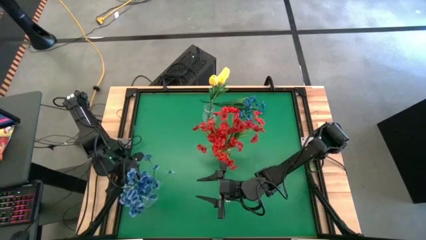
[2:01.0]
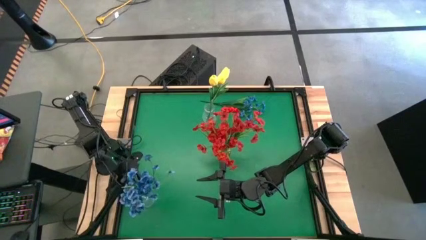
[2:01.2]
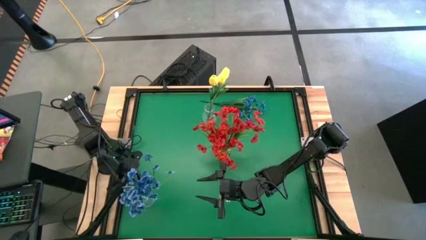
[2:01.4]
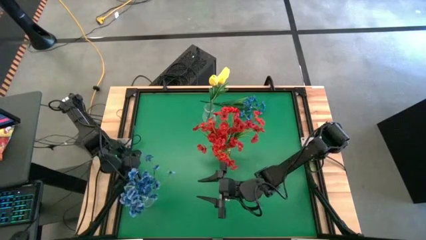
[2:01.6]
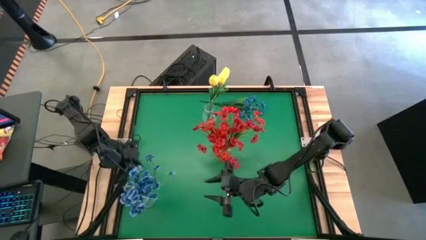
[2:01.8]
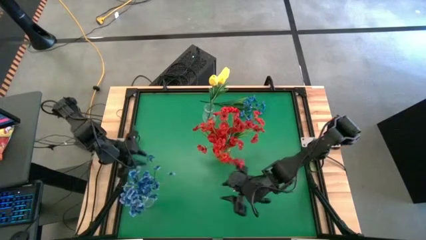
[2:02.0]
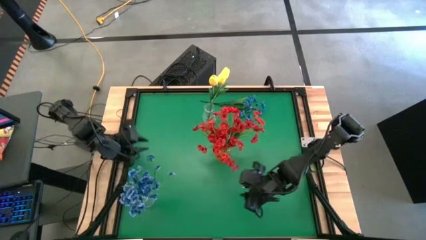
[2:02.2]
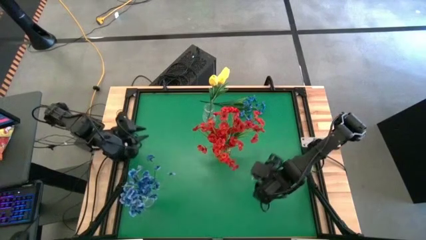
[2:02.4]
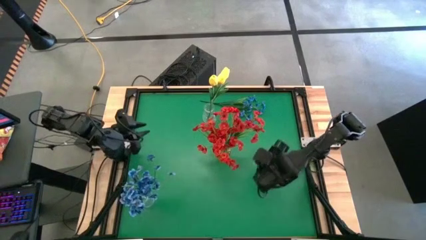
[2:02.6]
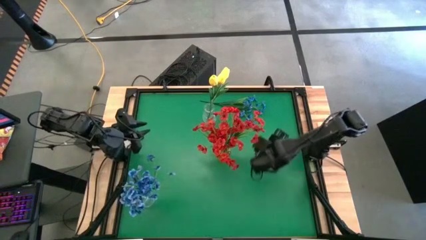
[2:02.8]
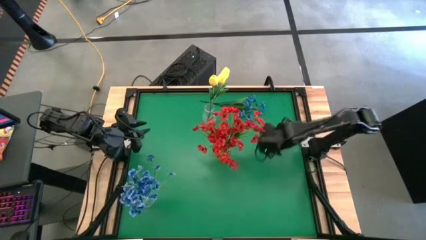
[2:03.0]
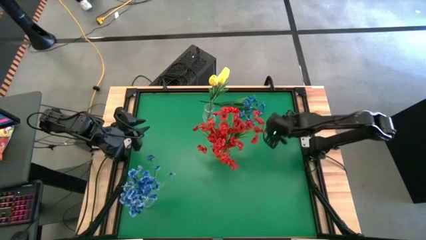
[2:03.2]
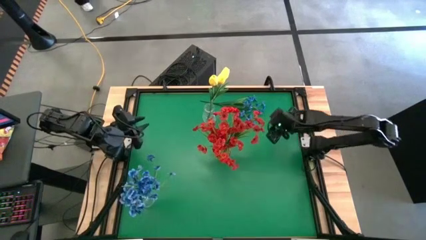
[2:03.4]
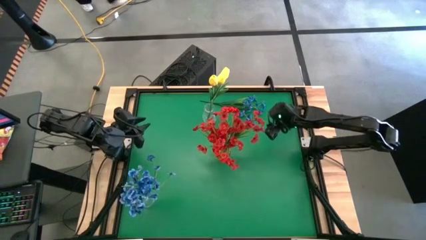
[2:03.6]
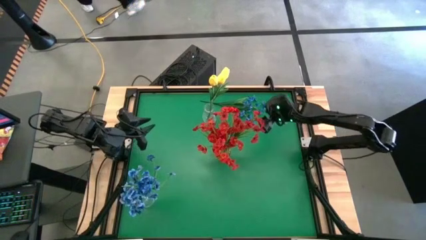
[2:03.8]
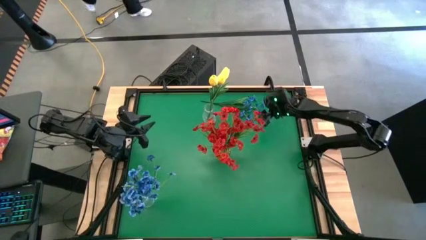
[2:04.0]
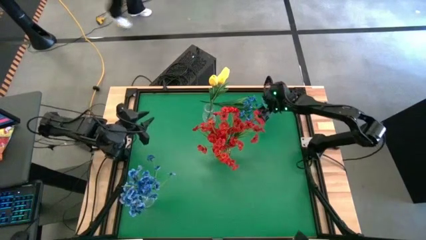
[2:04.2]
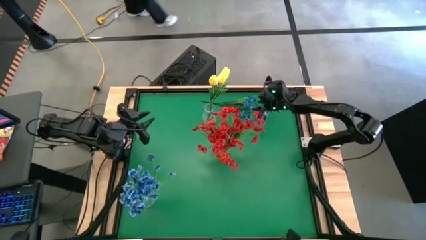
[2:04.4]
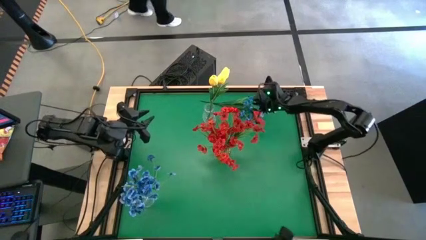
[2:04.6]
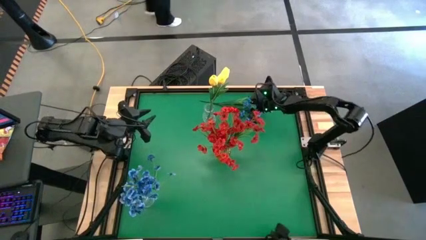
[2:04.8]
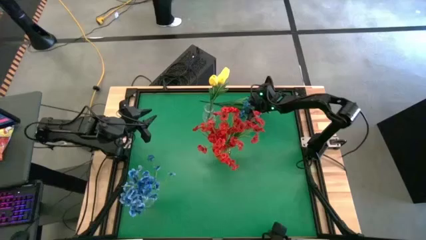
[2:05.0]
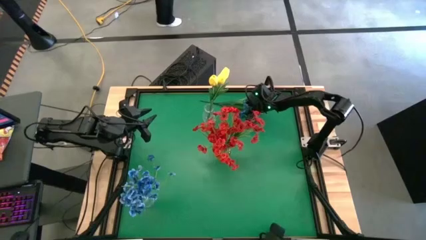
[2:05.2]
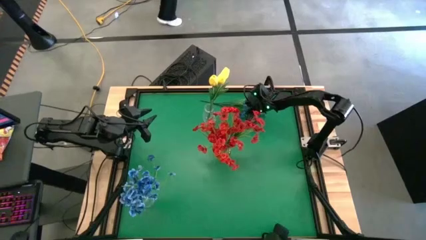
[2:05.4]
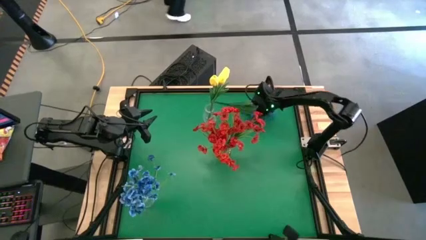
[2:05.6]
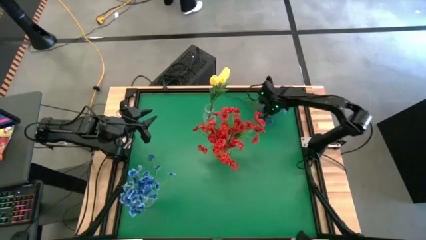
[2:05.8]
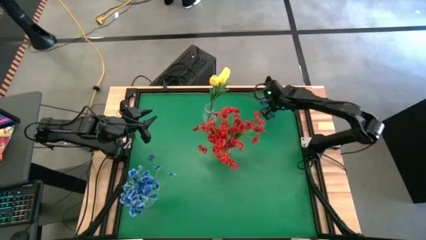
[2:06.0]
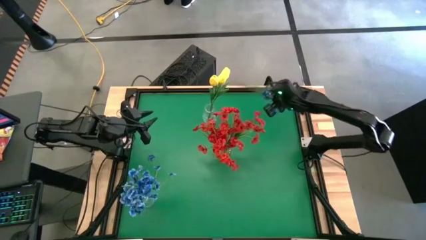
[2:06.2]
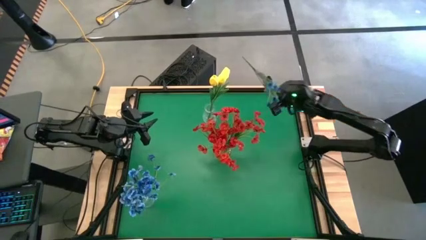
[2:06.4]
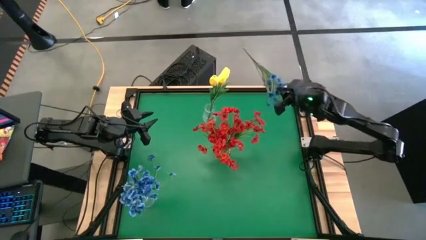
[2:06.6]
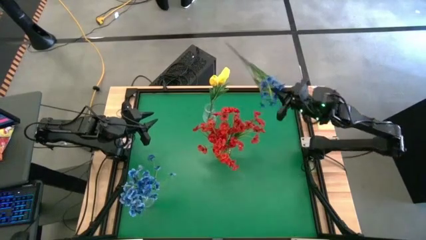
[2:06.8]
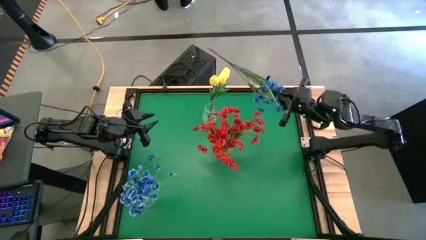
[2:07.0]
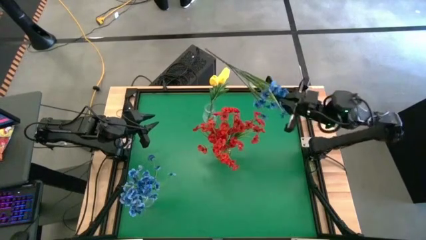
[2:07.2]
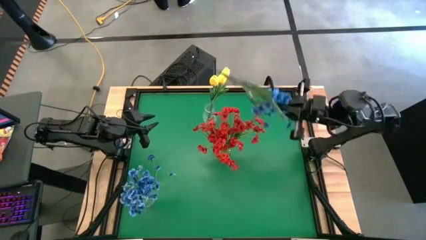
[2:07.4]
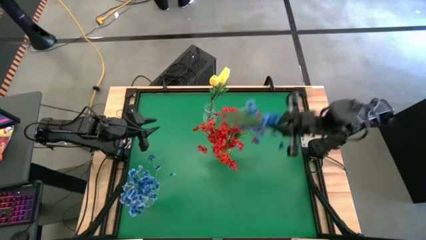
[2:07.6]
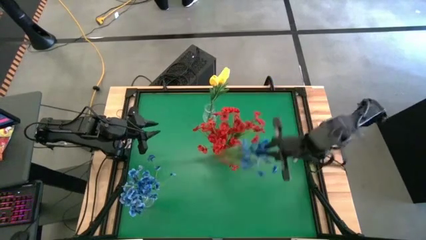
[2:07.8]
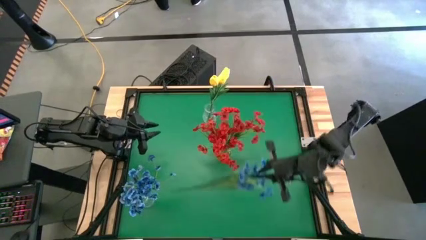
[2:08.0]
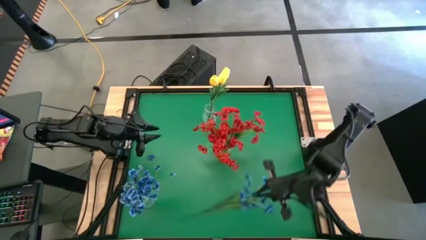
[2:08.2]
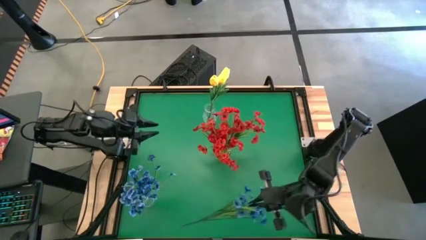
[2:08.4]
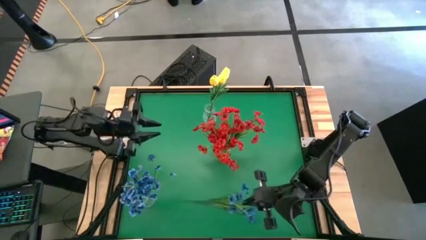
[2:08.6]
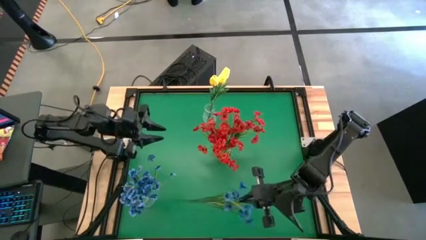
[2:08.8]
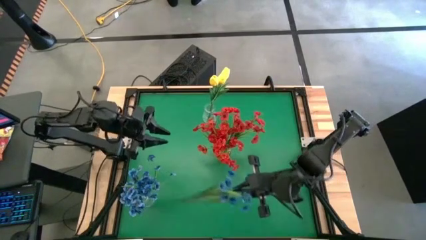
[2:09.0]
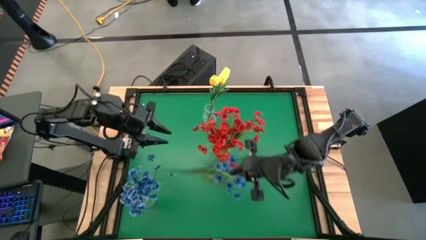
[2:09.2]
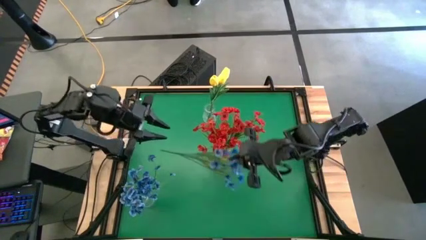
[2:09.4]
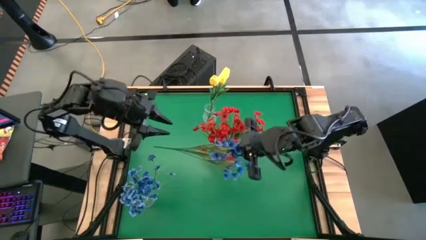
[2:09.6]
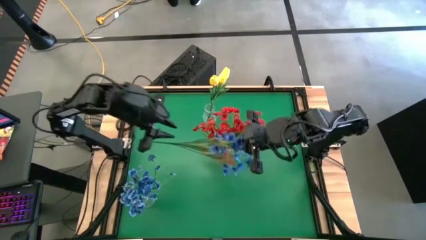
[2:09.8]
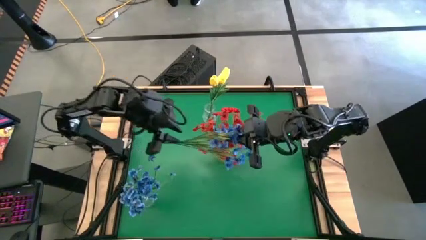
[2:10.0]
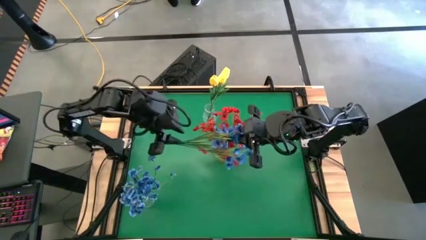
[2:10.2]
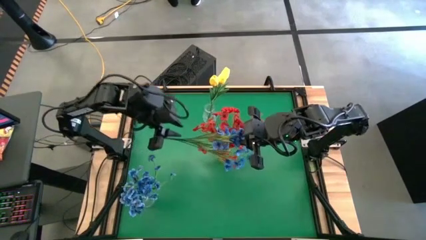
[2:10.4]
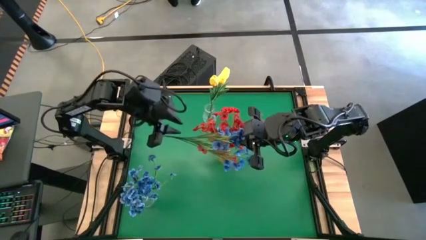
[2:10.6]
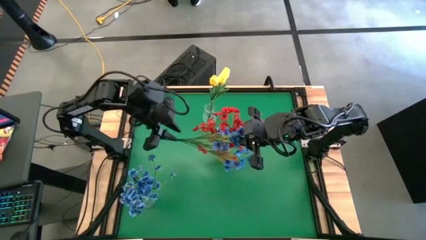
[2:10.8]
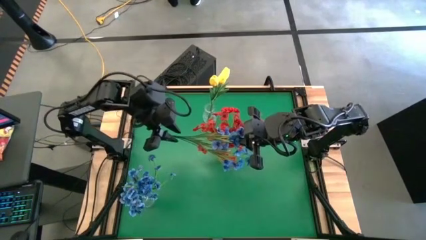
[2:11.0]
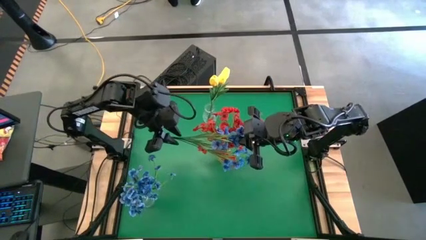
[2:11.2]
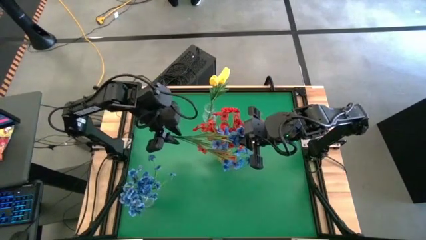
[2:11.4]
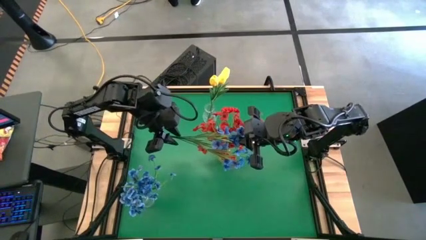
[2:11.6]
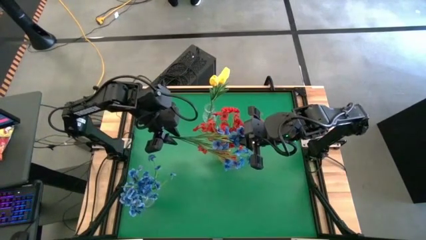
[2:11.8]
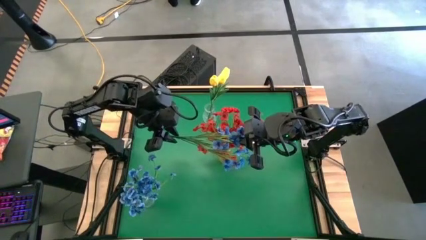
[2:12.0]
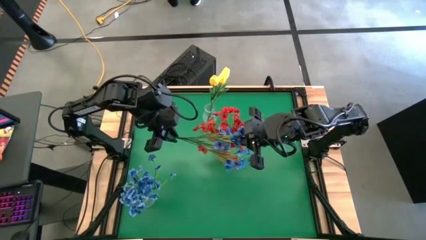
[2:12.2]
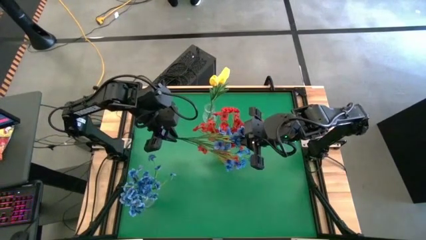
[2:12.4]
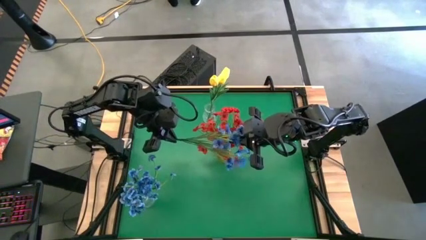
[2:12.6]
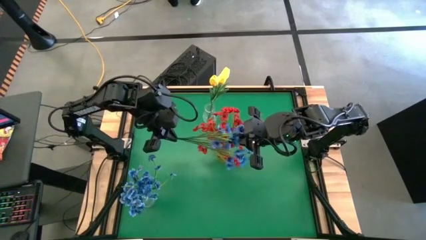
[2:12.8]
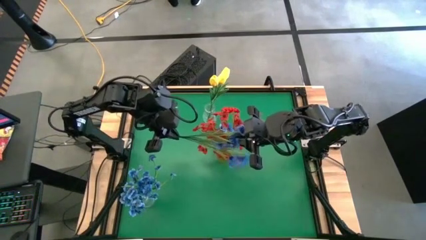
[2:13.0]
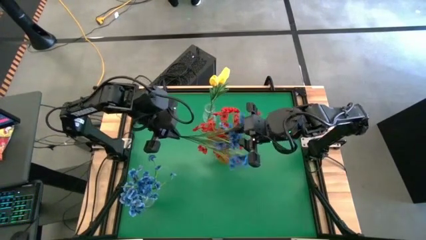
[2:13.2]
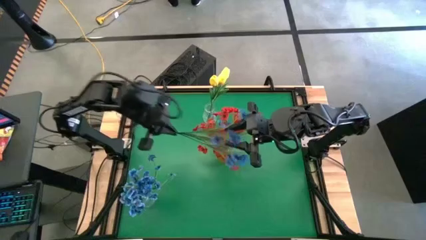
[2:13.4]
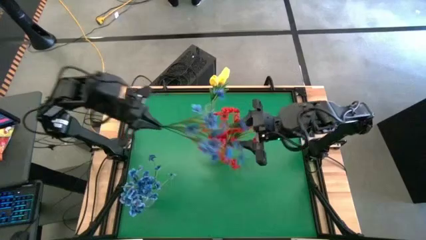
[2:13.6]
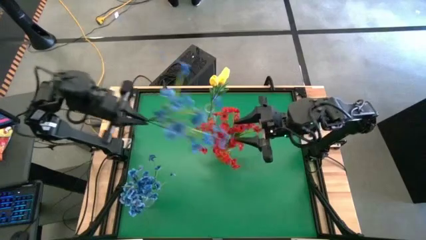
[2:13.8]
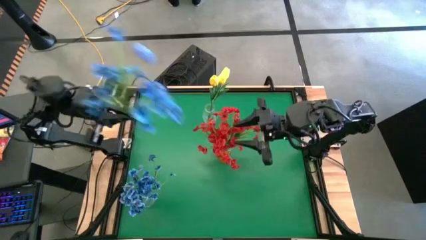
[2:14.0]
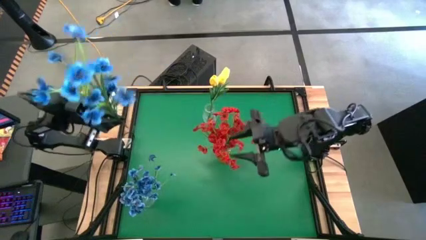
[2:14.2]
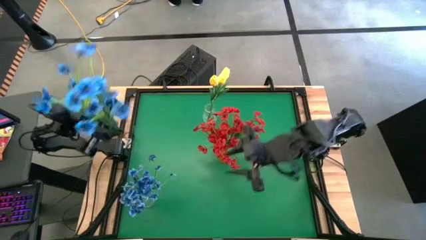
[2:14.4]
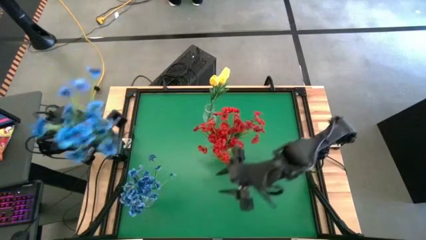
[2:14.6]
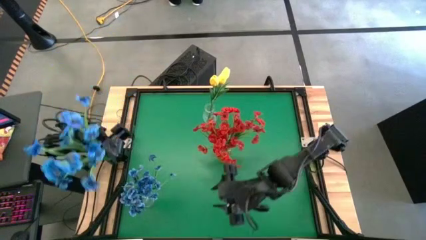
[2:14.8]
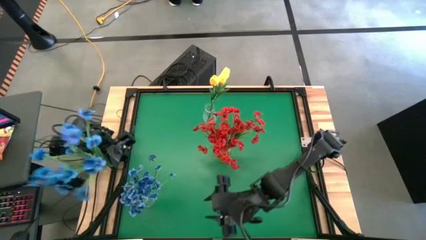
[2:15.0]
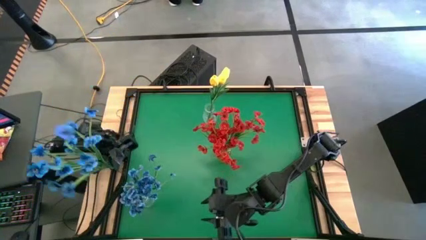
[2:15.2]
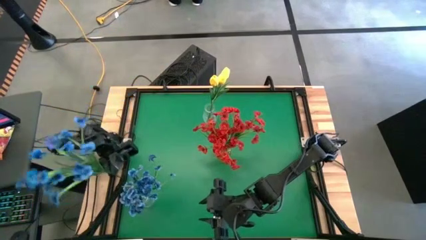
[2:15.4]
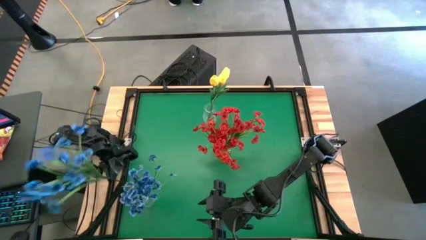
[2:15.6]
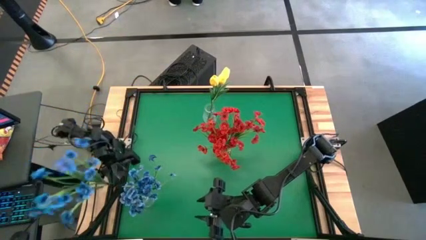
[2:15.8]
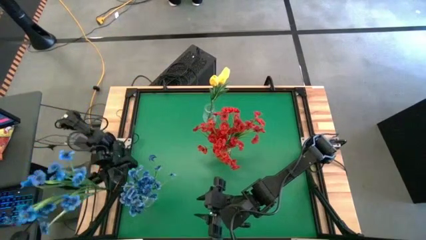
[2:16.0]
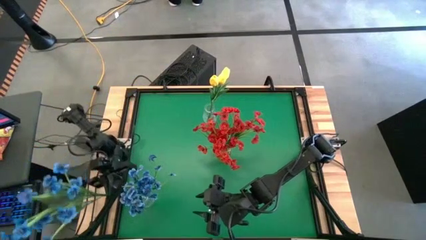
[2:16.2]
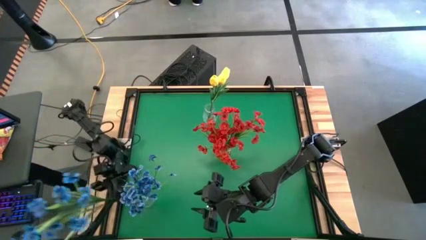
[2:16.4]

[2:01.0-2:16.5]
Task: Sort flowers into vase by color
Put the blue flowers into the bottom transparent vase
